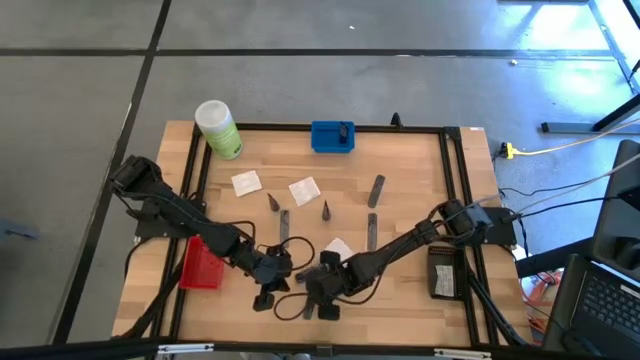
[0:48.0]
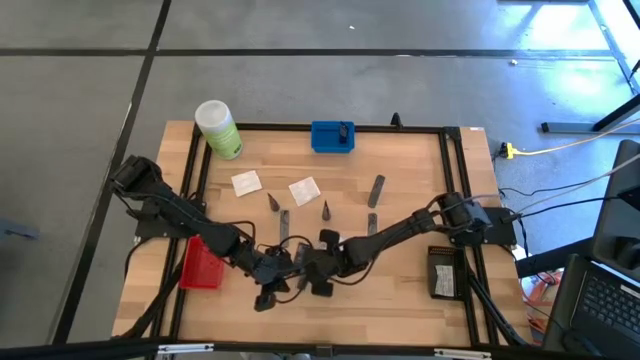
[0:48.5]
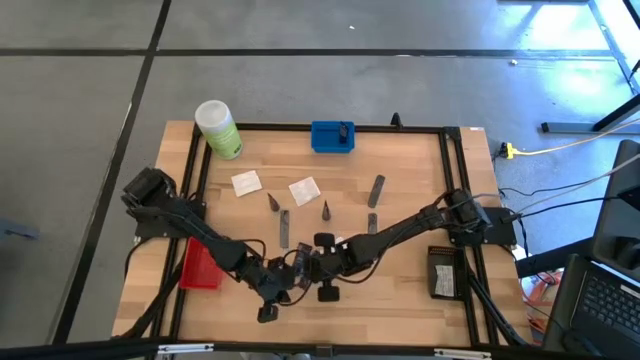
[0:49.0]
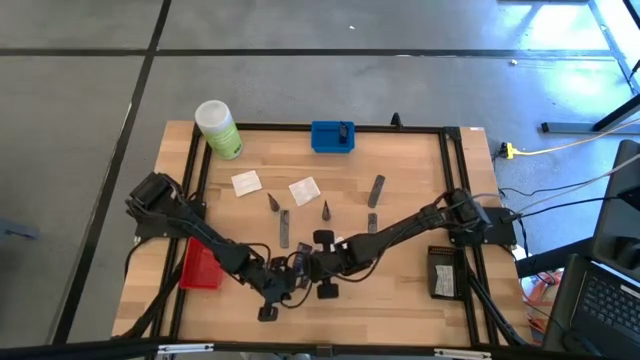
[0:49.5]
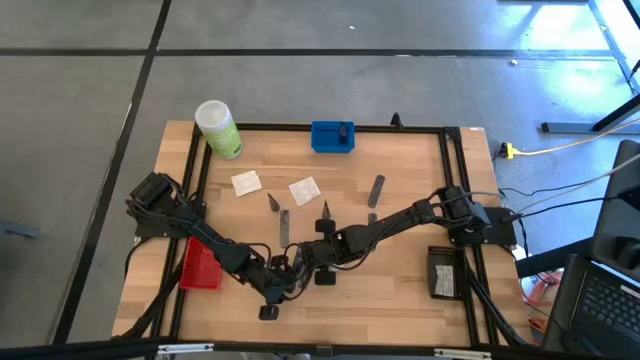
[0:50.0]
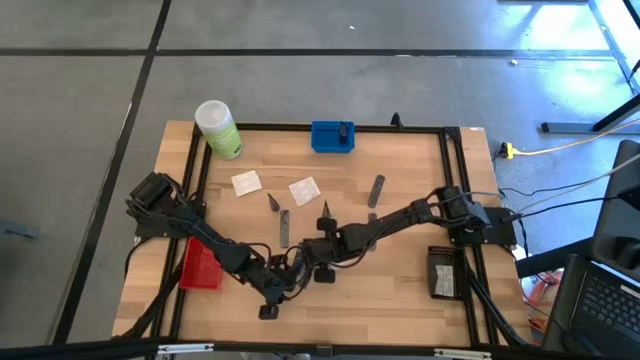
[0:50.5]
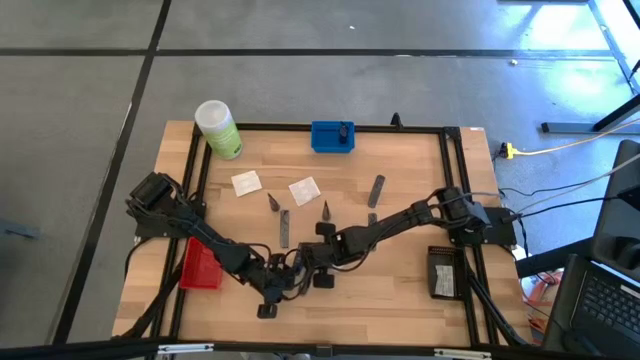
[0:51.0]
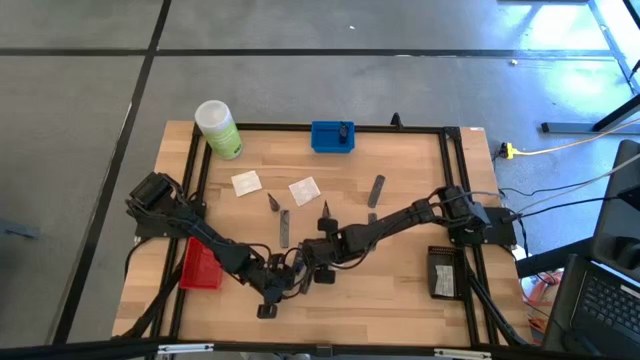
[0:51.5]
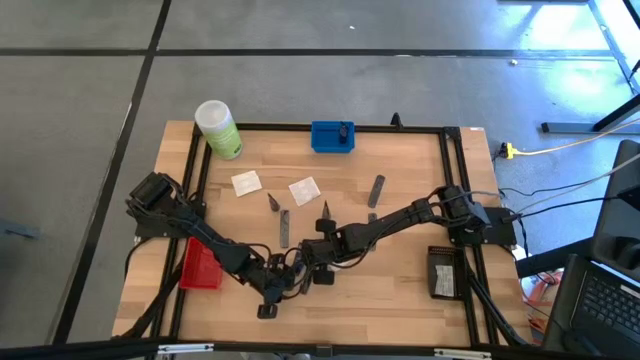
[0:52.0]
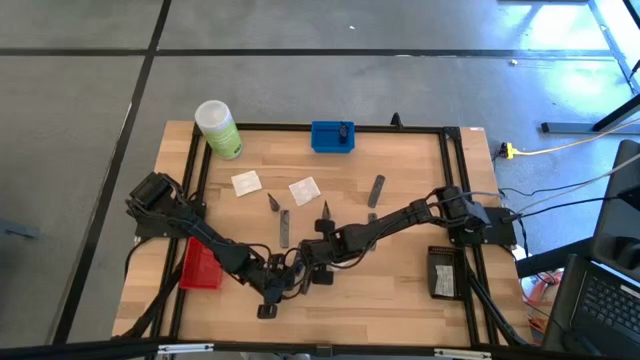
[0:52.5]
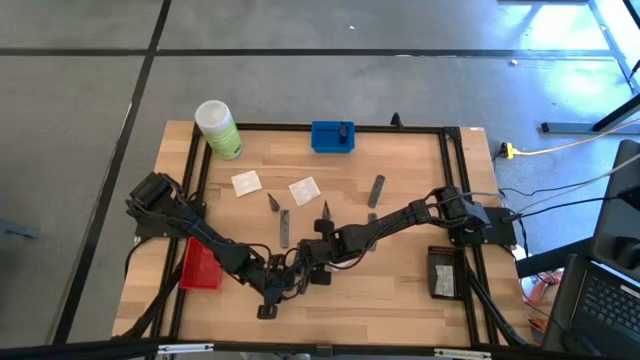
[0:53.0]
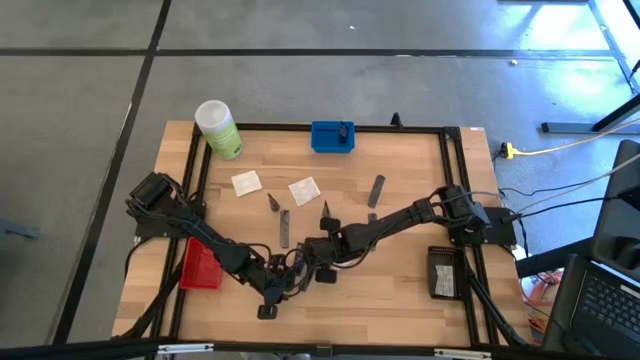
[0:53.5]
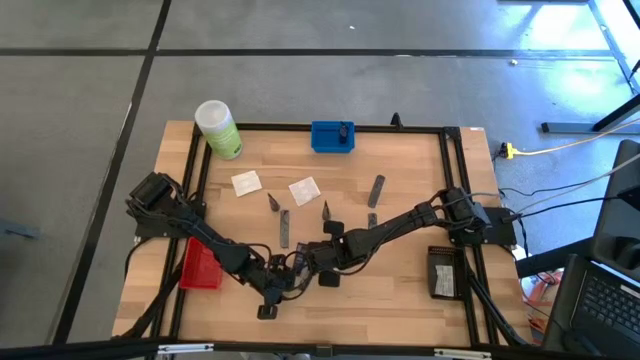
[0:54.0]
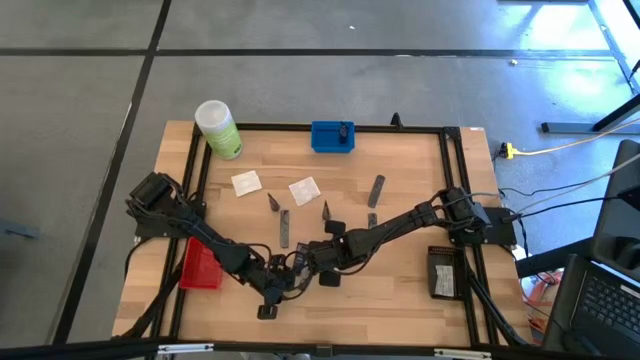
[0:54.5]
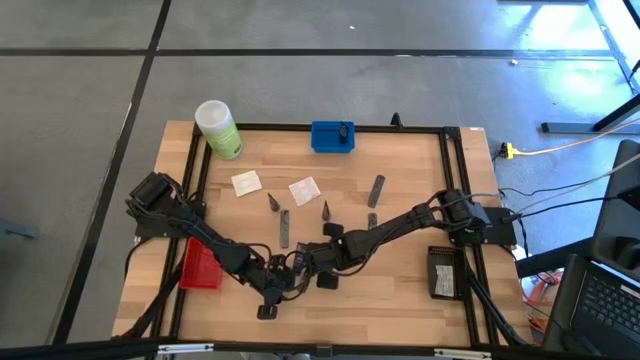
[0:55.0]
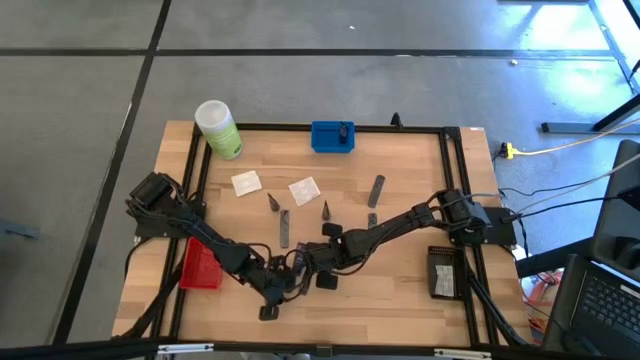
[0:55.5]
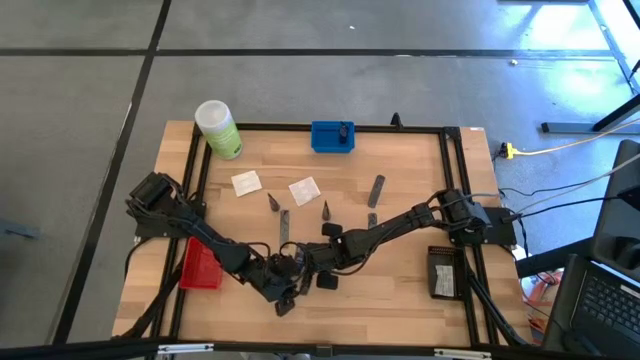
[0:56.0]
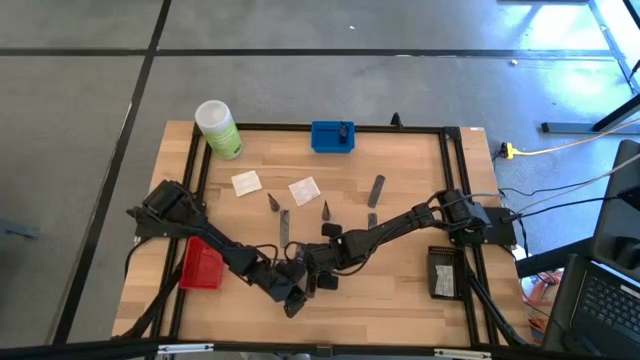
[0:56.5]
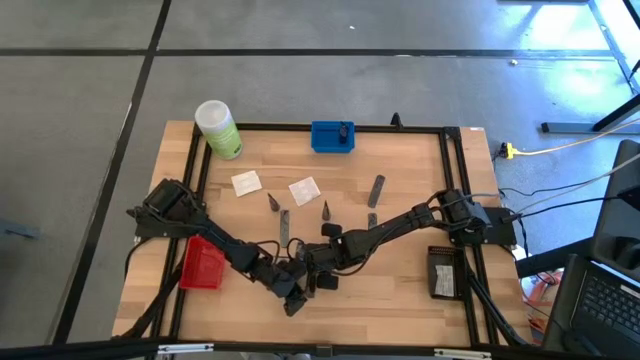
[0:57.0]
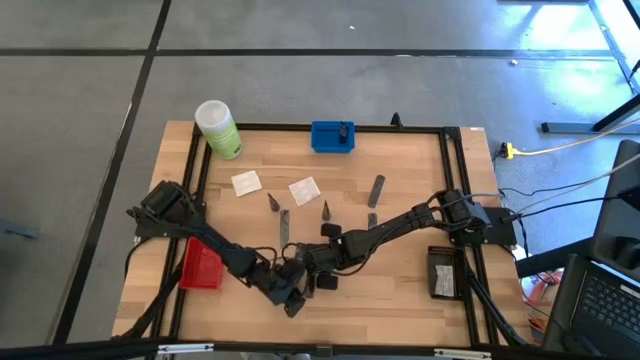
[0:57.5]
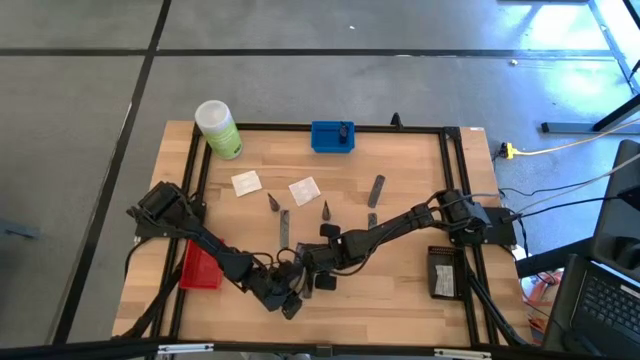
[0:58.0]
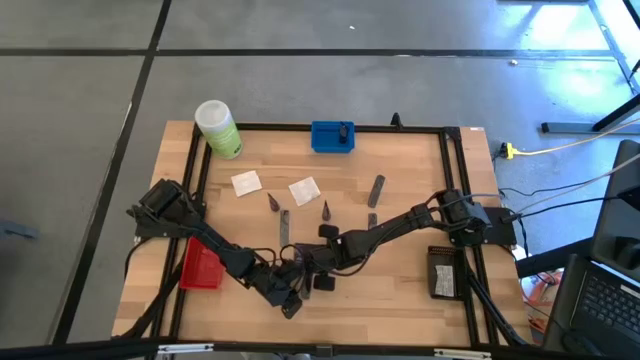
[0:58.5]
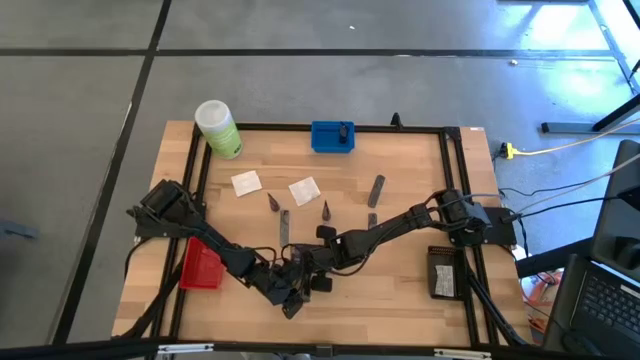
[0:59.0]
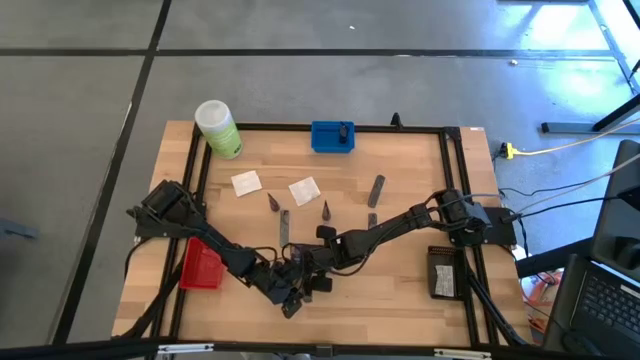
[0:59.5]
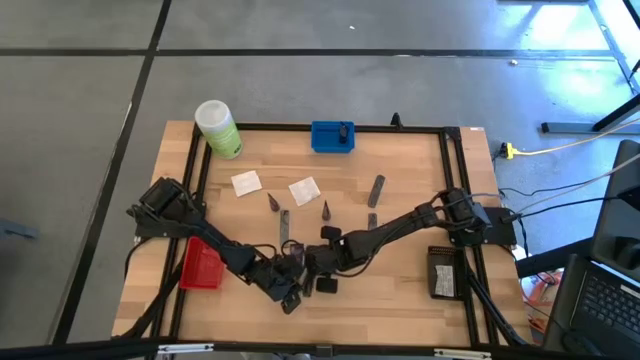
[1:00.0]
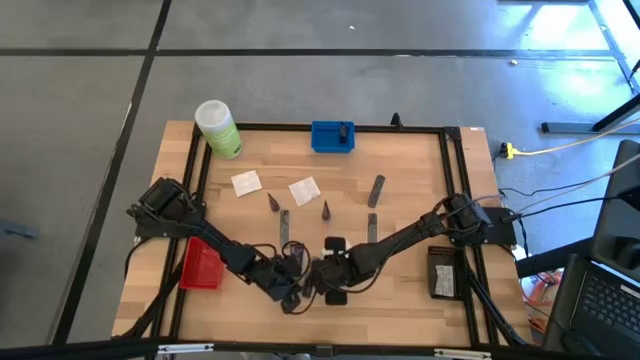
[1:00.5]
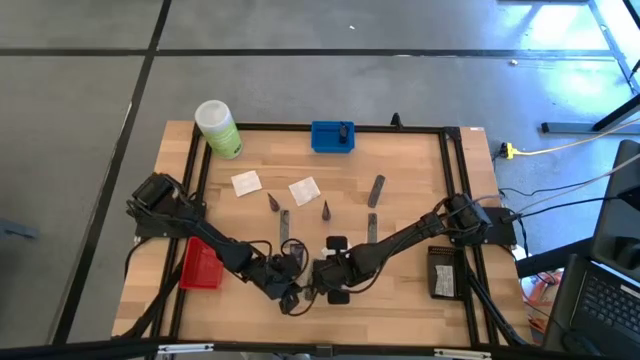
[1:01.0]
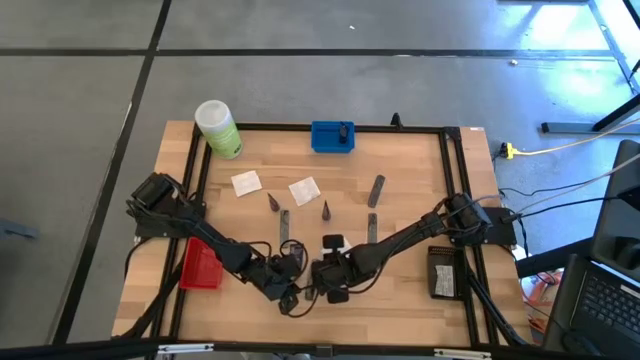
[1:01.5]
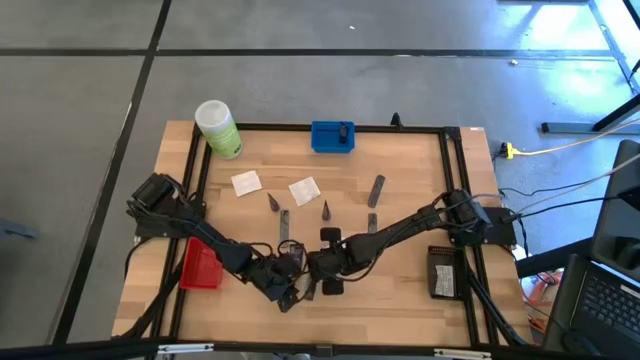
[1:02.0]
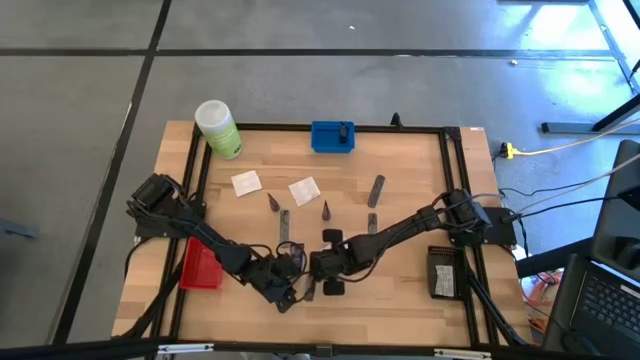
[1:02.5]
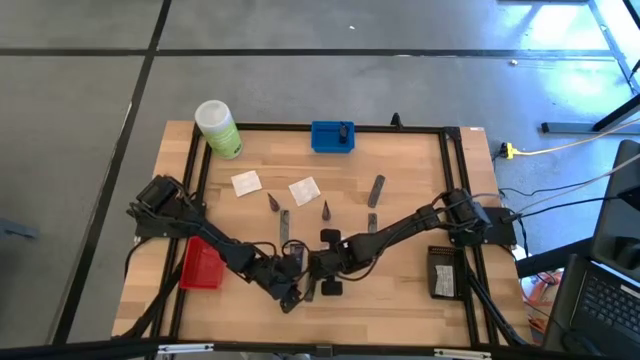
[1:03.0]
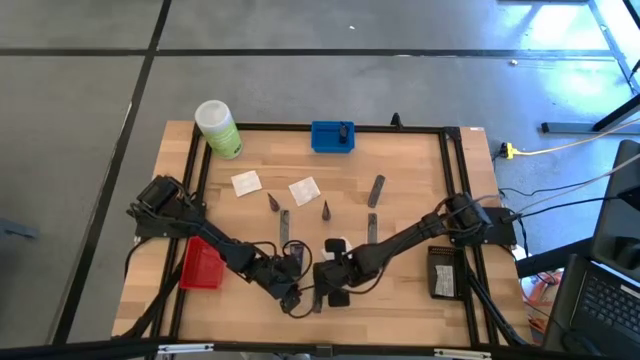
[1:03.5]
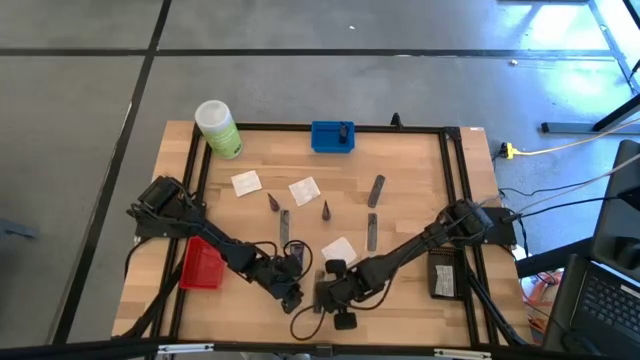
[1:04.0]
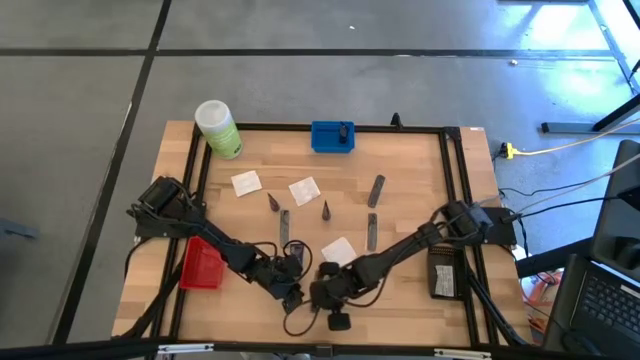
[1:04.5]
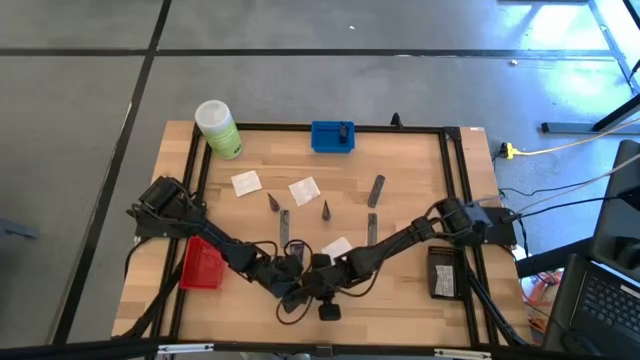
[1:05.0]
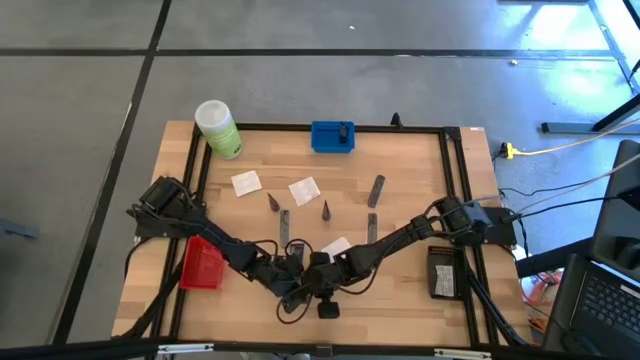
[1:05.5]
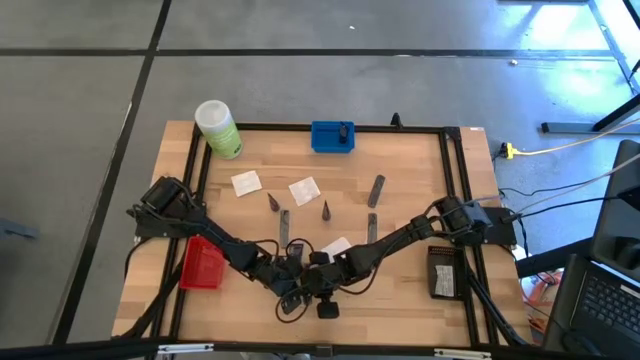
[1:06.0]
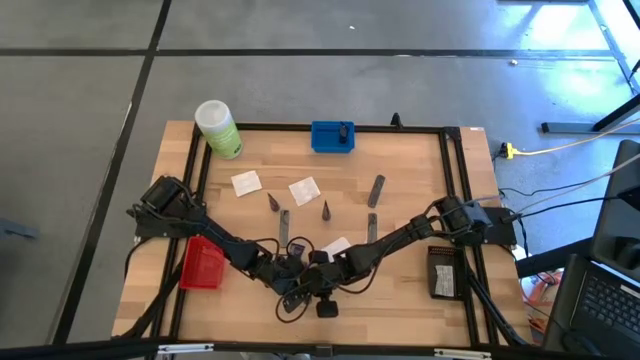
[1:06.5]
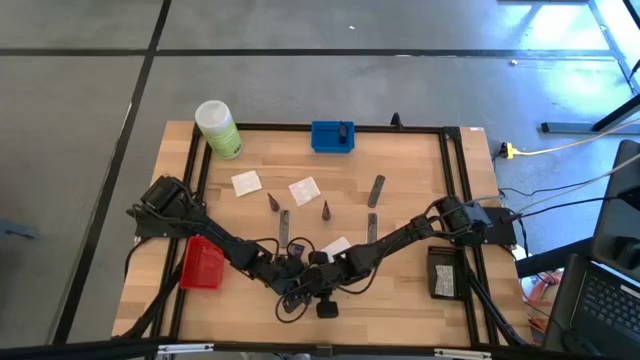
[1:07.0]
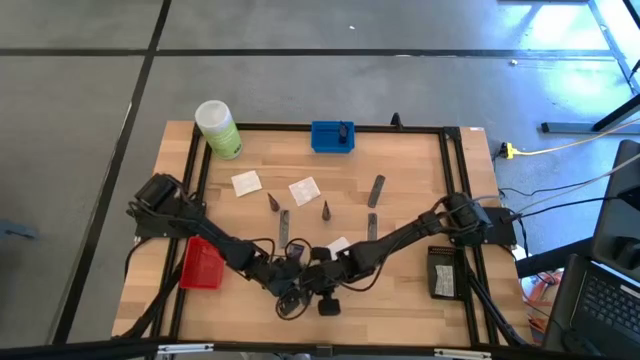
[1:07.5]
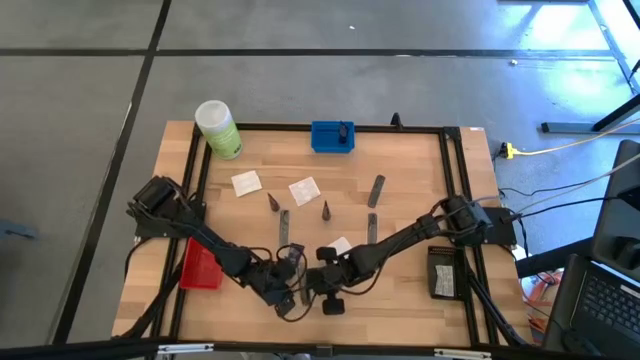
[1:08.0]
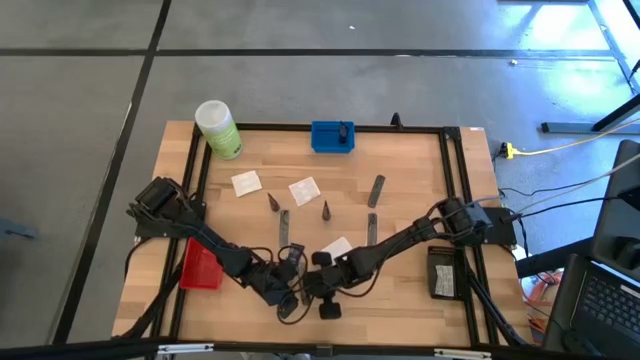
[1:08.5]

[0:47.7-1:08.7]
Task: Pick & Place Travel size toiletries
Put the black hair comb into the red basket
